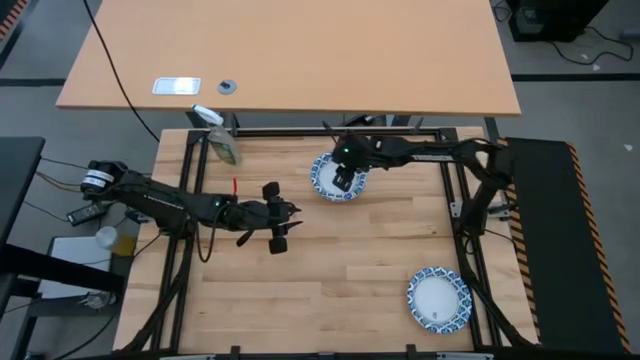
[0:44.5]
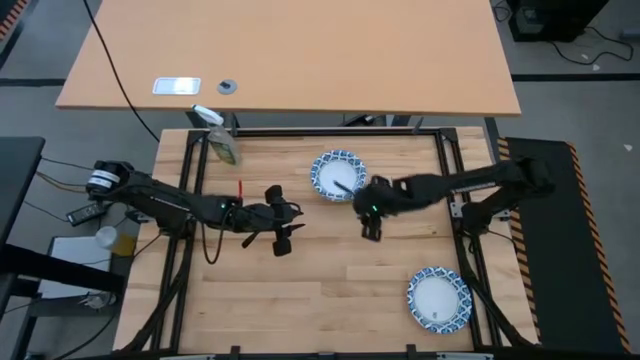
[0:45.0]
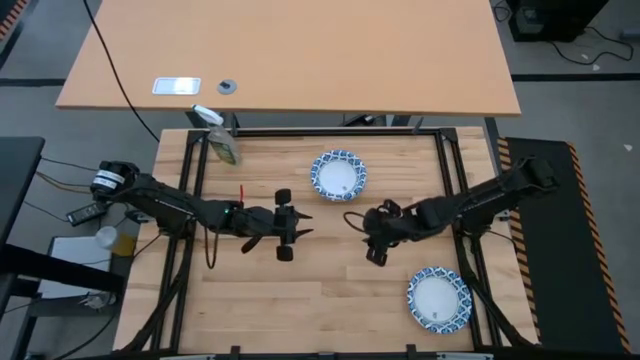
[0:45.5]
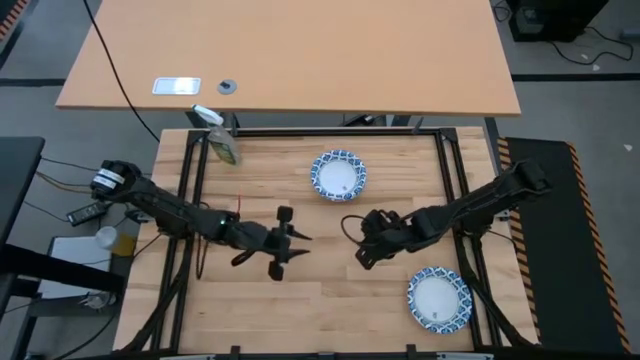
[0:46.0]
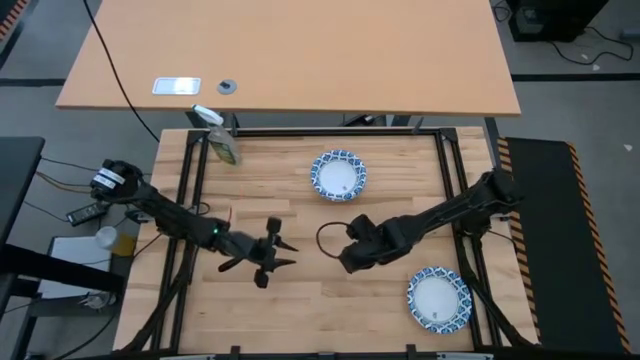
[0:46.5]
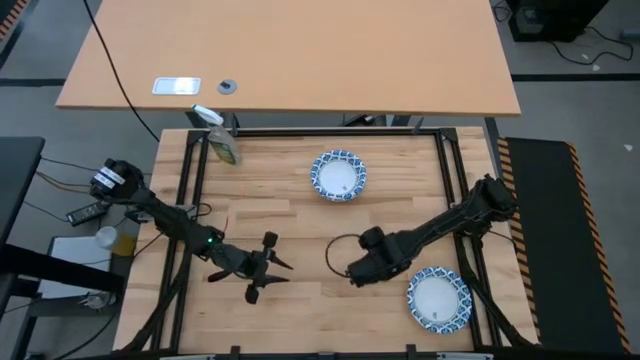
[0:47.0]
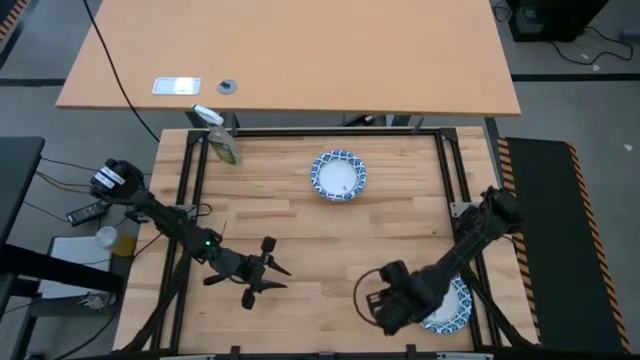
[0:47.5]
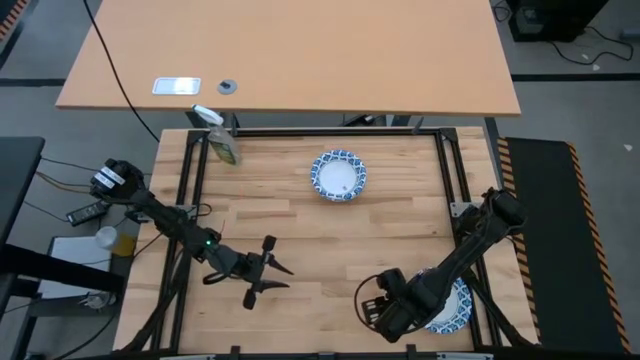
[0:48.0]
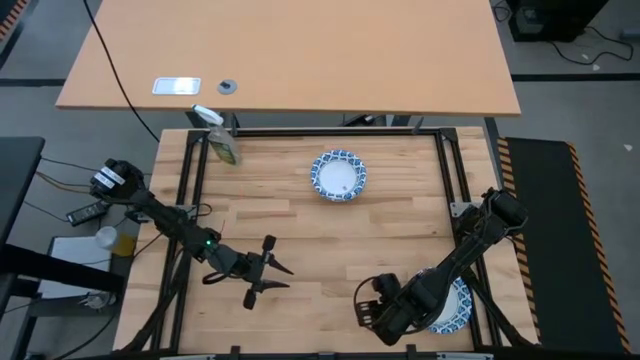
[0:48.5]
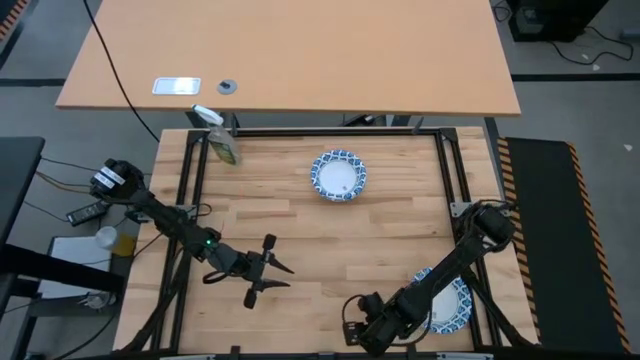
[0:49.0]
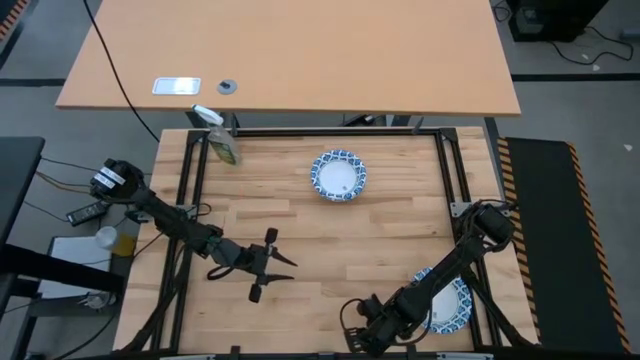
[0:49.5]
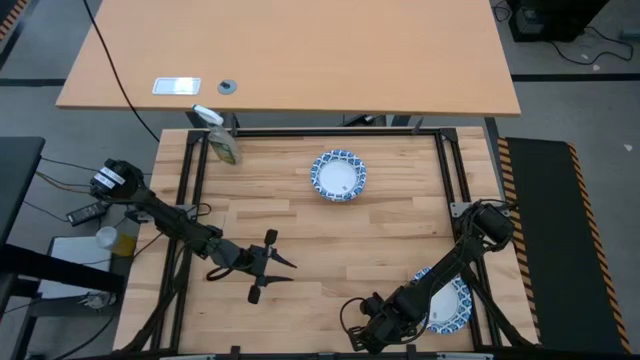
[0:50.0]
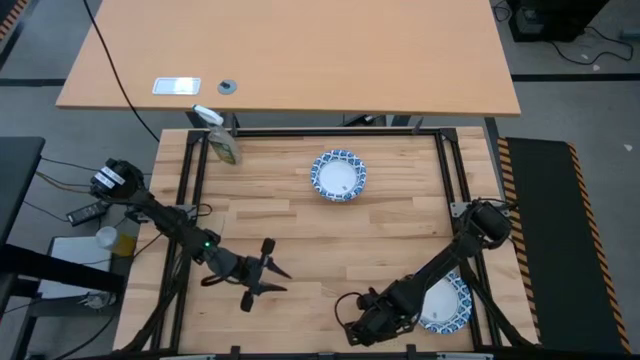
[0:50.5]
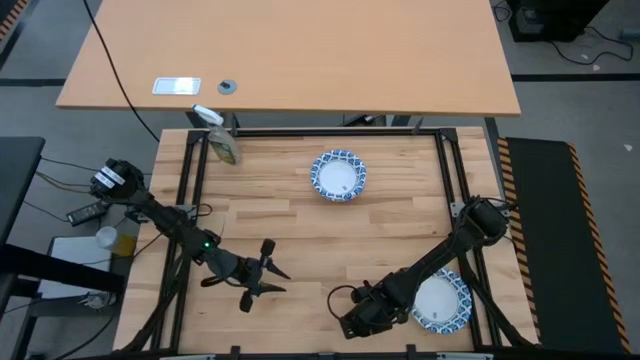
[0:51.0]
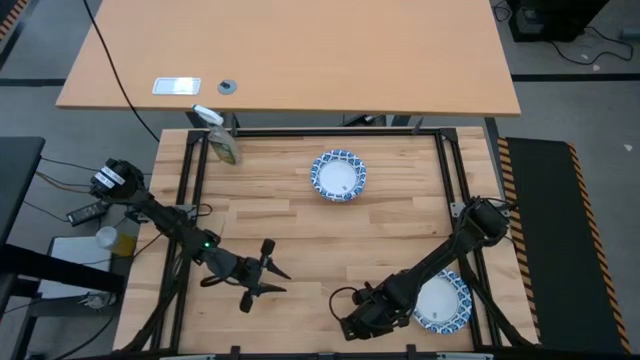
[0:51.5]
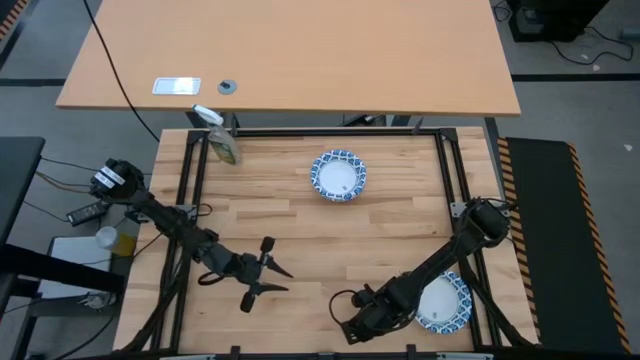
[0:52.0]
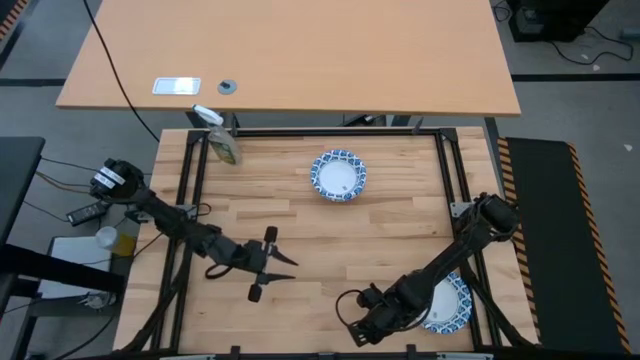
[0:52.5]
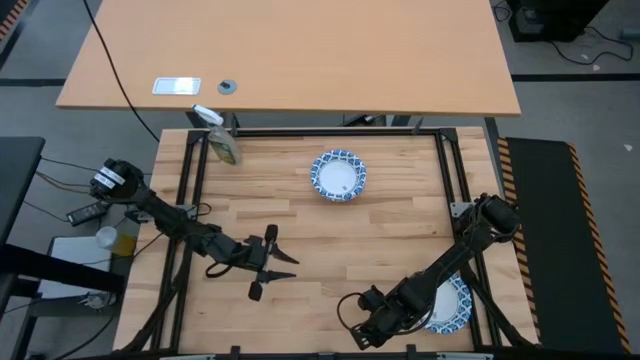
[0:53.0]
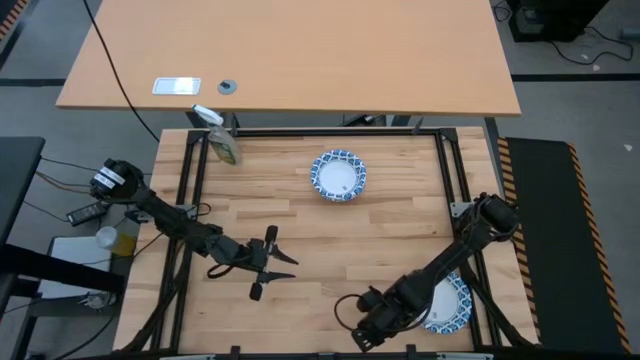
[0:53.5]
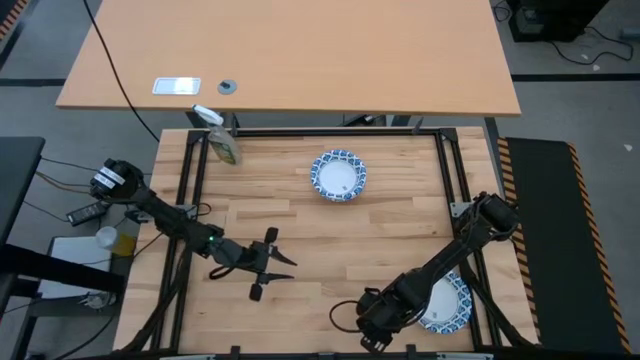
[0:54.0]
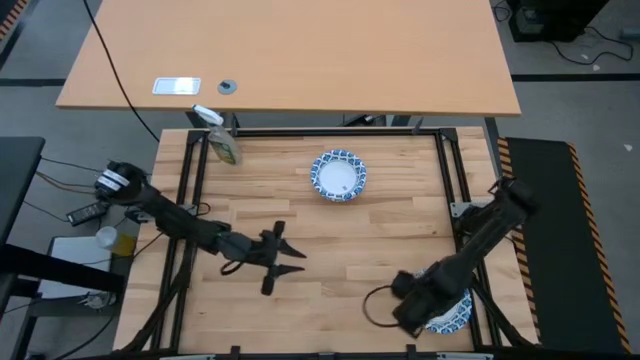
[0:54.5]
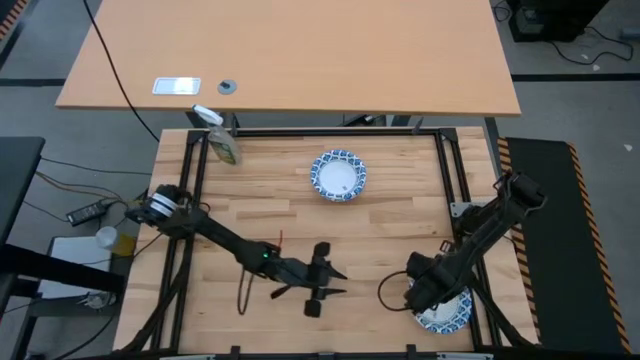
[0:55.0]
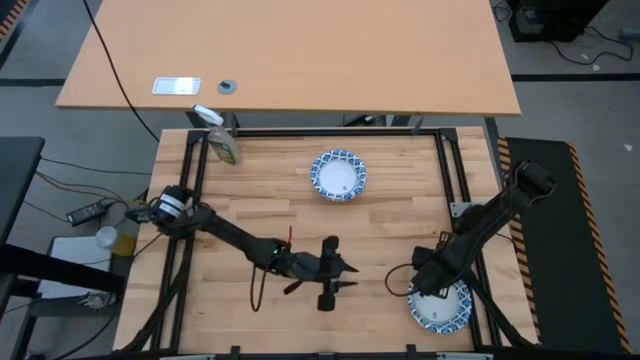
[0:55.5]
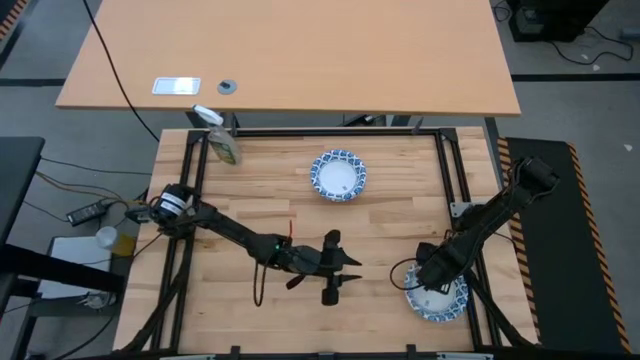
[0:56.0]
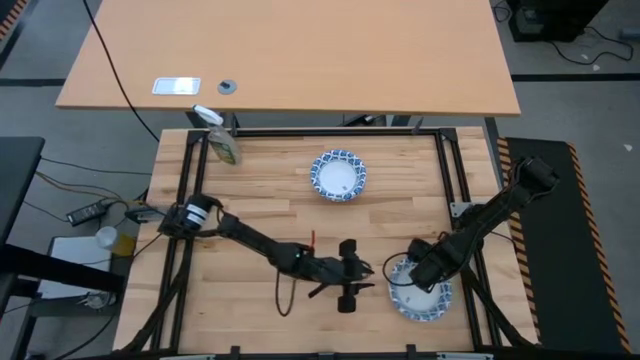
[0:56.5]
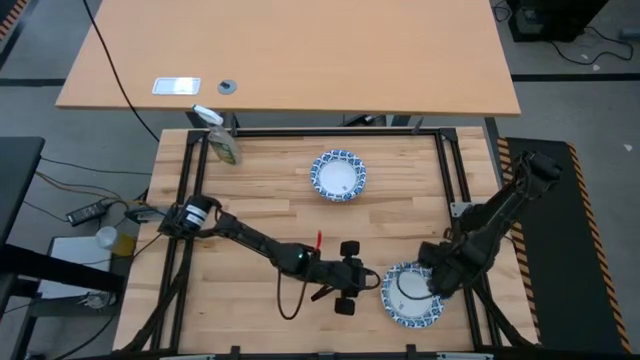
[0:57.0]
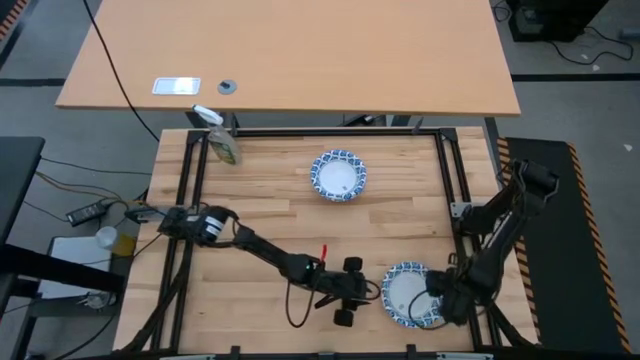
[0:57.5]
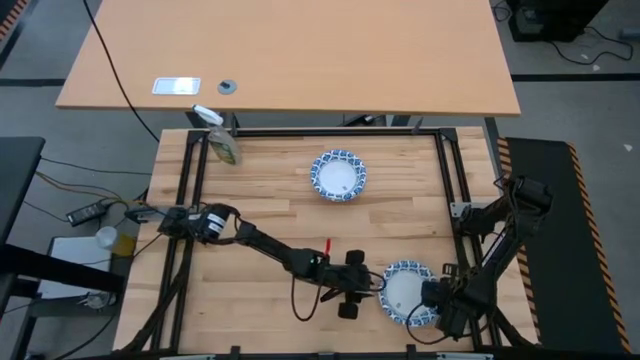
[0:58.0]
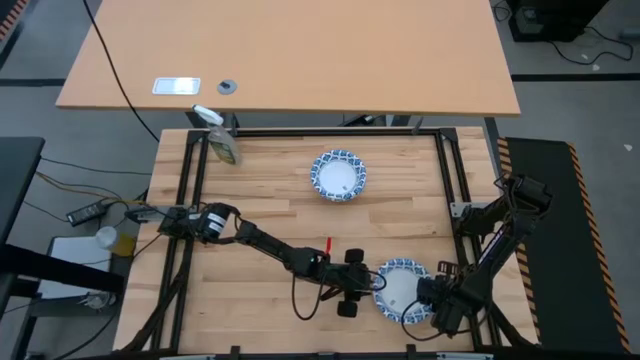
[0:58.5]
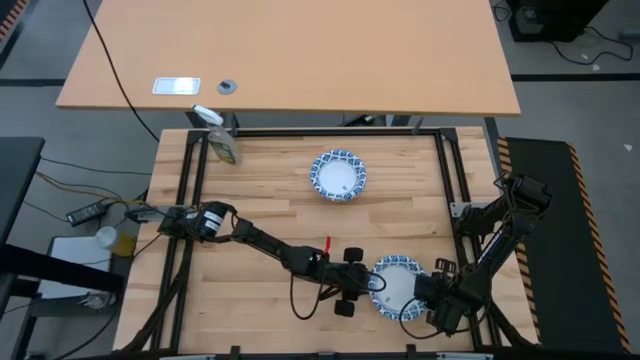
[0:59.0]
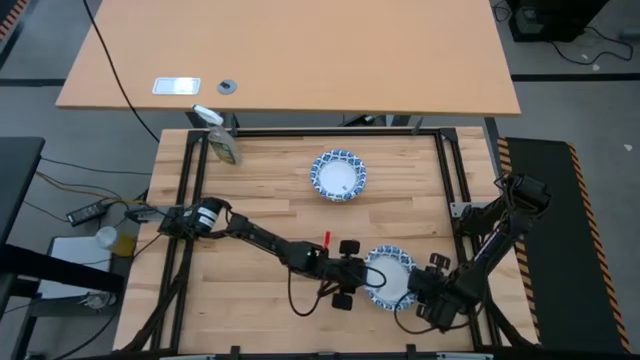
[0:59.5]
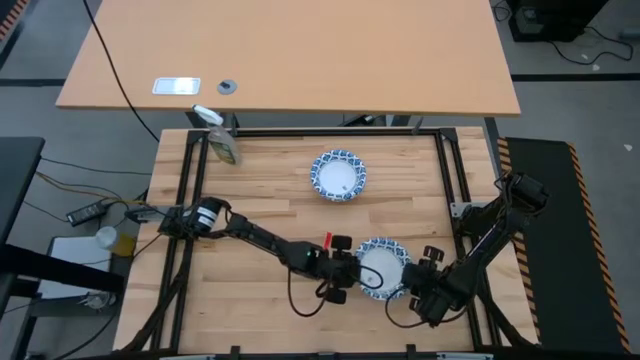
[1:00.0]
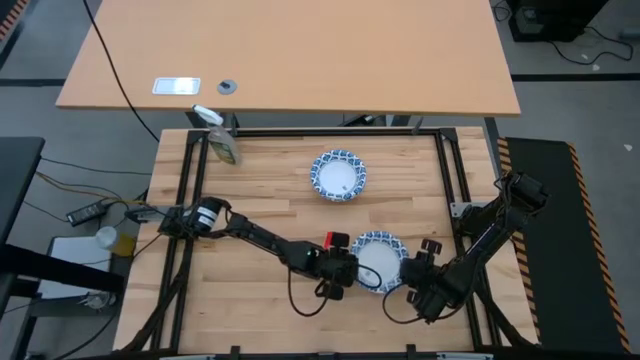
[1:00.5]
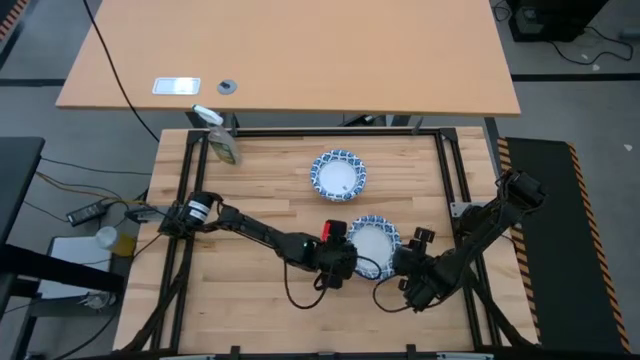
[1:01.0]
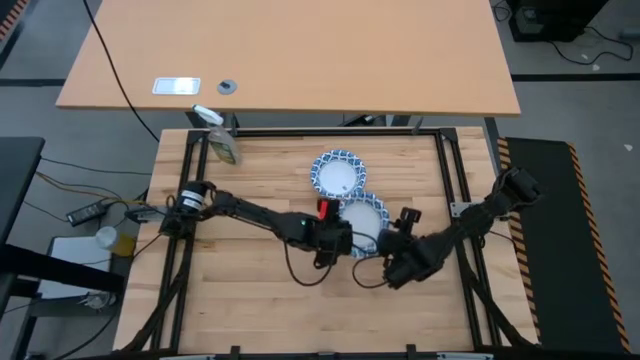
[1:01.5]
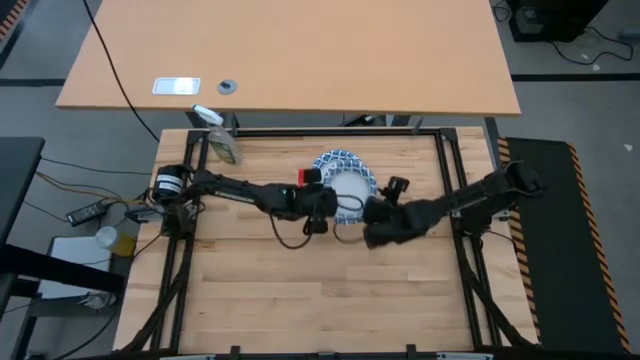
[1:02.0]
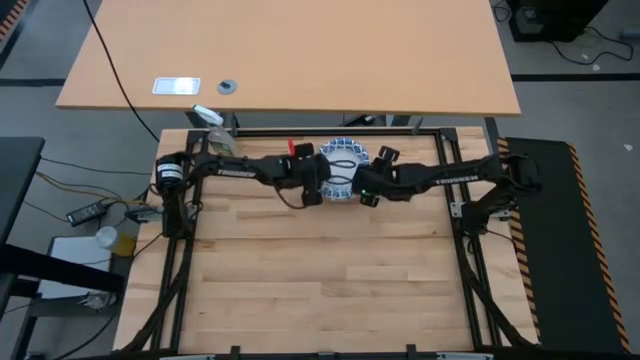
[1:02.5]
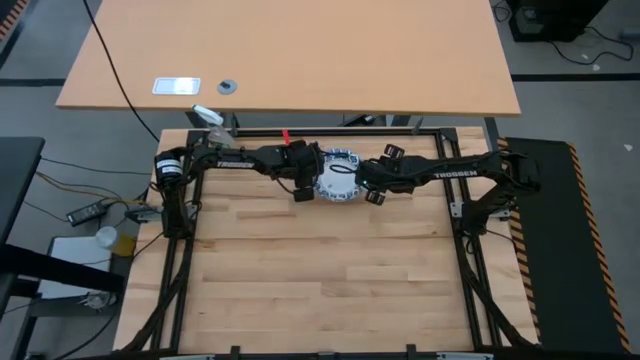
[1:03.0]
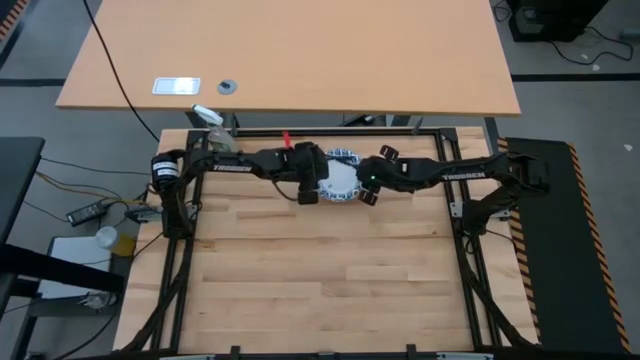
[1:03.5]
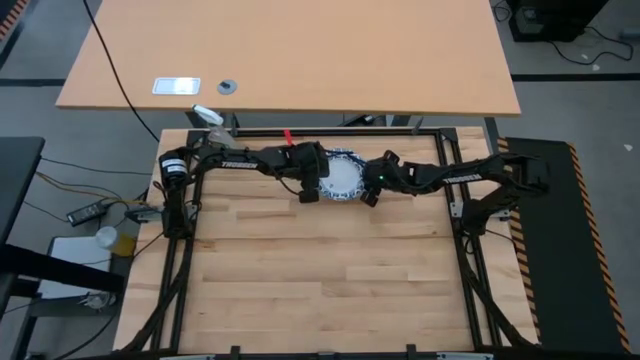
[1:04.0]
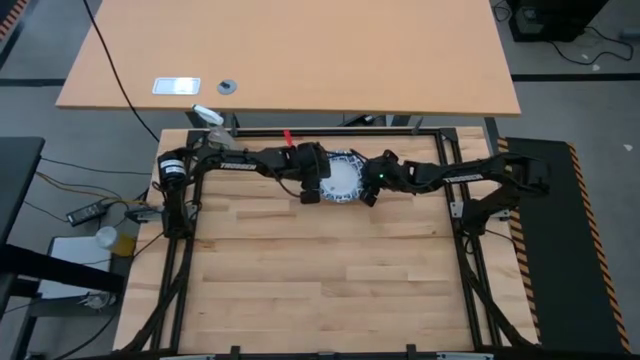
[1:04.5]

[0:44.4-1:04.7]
Stack the blue white patterned bowl on top of the other blue white patterned bowls
